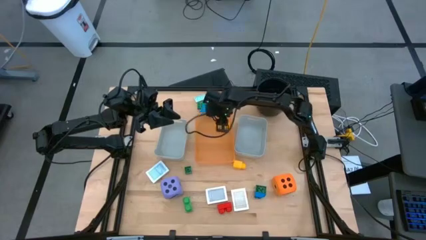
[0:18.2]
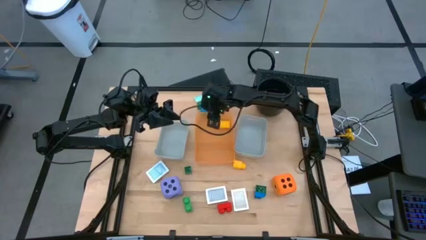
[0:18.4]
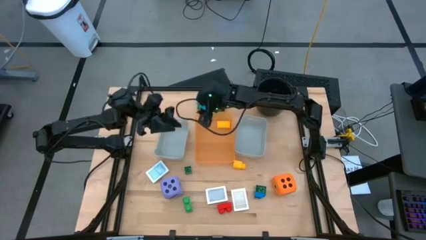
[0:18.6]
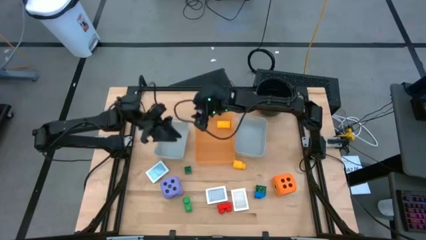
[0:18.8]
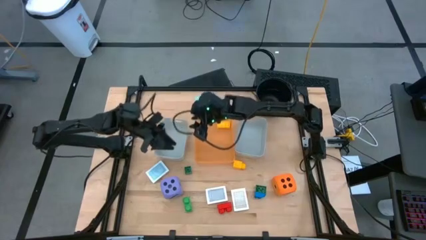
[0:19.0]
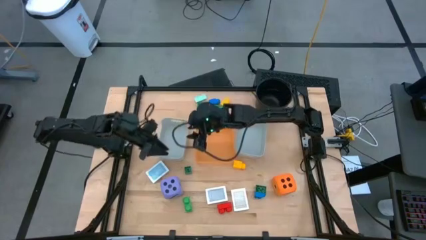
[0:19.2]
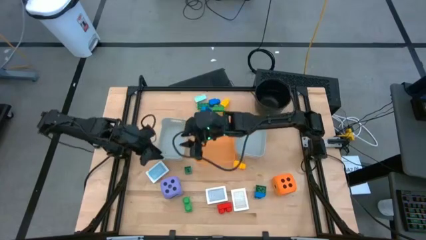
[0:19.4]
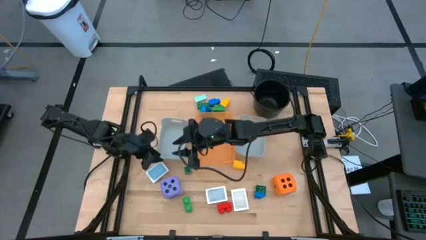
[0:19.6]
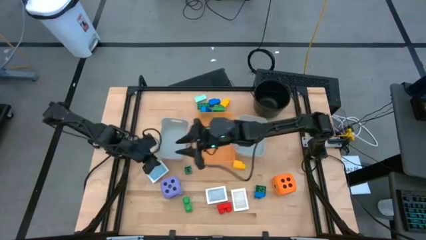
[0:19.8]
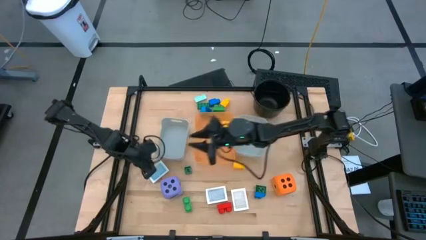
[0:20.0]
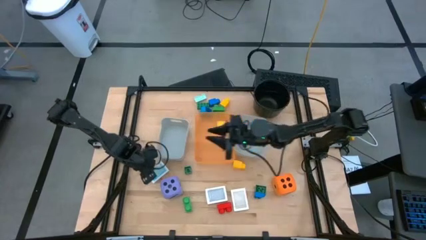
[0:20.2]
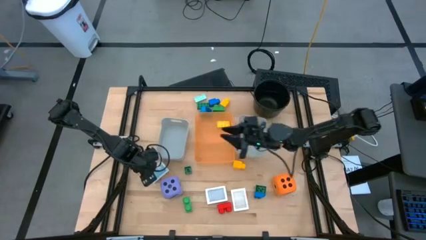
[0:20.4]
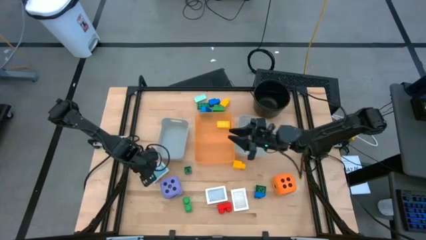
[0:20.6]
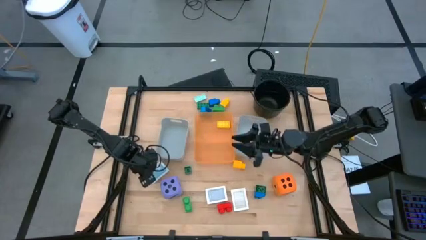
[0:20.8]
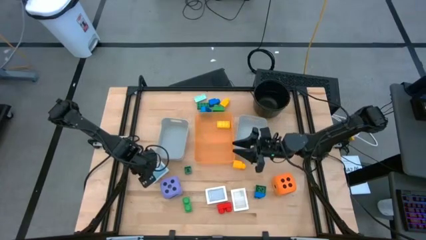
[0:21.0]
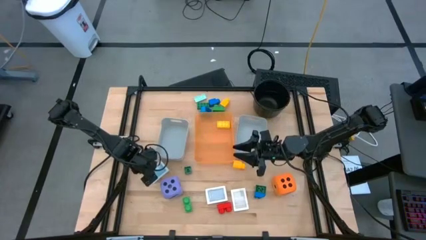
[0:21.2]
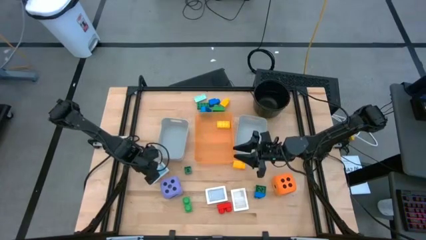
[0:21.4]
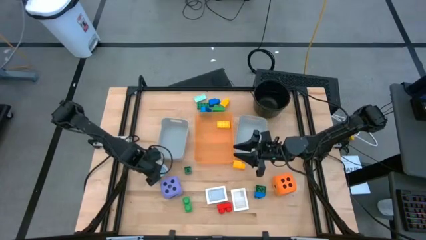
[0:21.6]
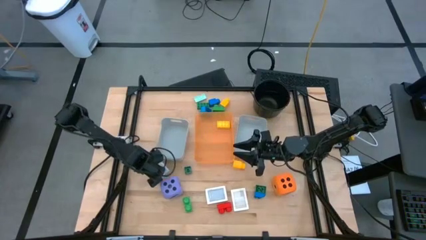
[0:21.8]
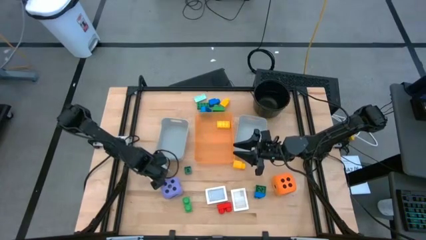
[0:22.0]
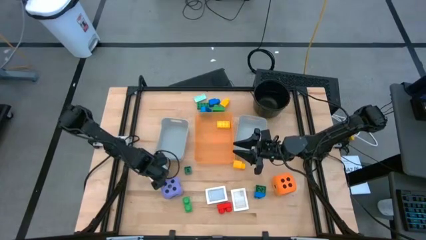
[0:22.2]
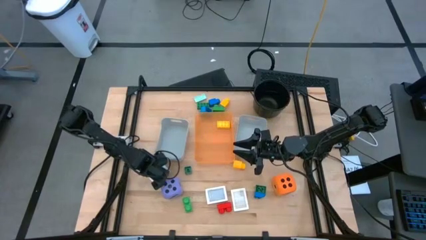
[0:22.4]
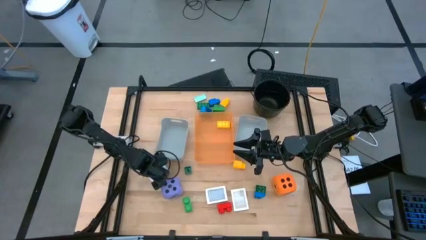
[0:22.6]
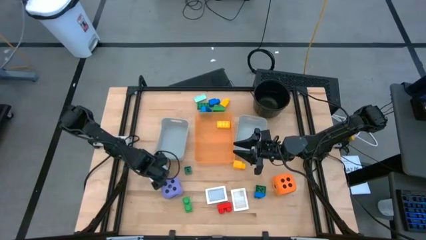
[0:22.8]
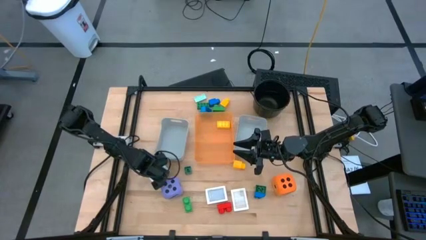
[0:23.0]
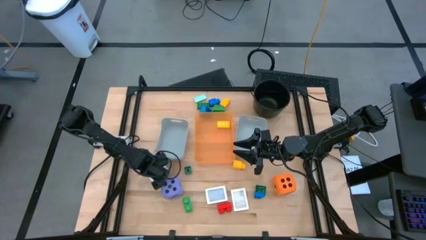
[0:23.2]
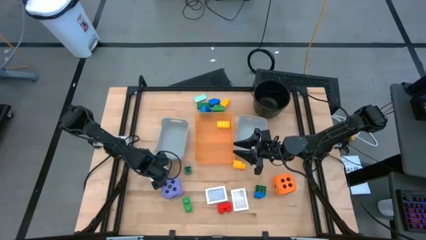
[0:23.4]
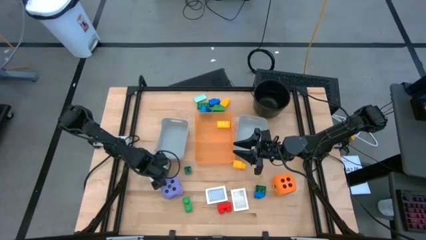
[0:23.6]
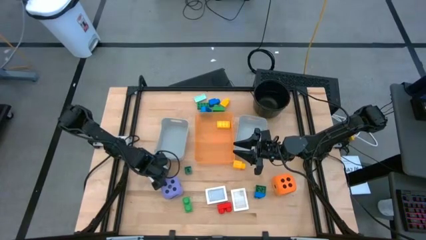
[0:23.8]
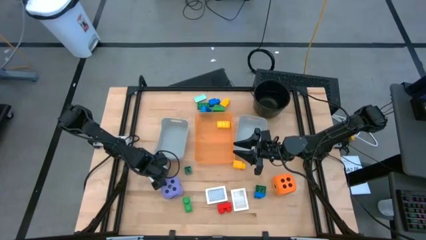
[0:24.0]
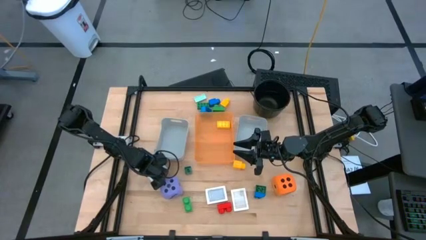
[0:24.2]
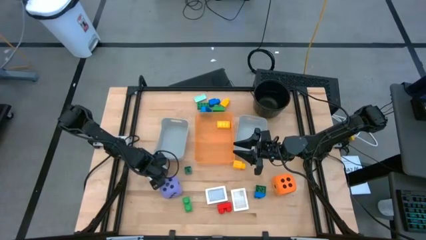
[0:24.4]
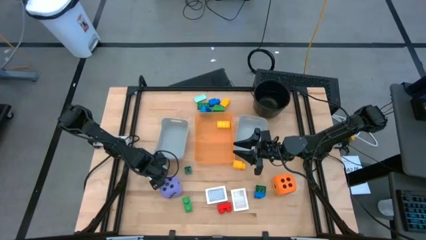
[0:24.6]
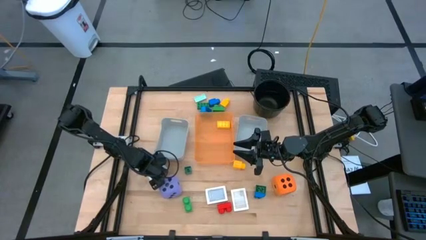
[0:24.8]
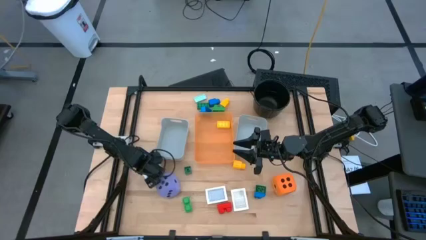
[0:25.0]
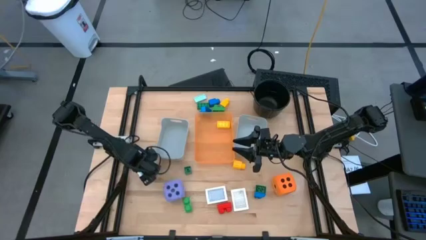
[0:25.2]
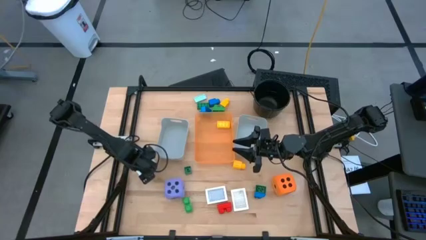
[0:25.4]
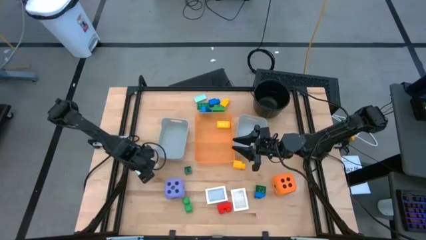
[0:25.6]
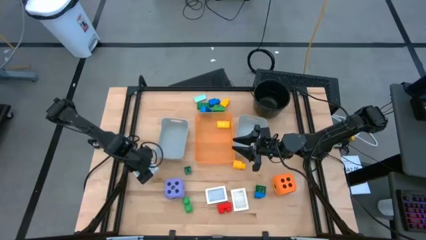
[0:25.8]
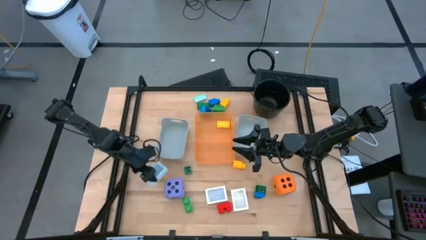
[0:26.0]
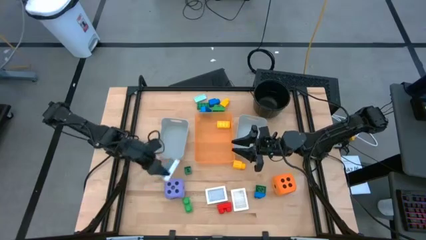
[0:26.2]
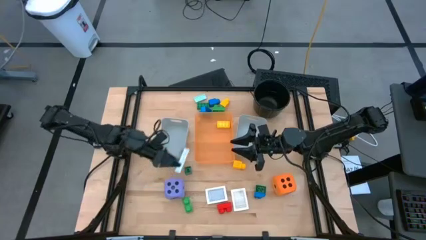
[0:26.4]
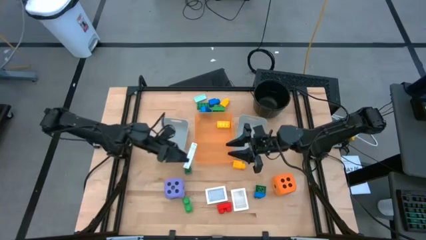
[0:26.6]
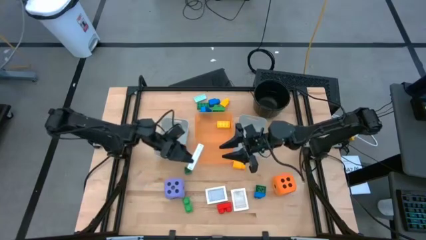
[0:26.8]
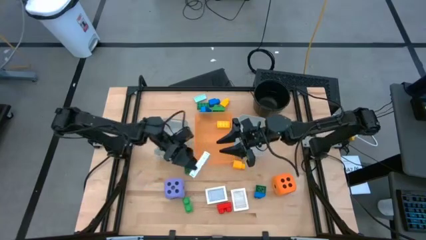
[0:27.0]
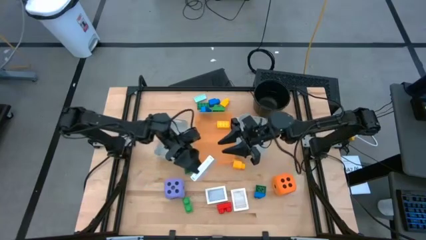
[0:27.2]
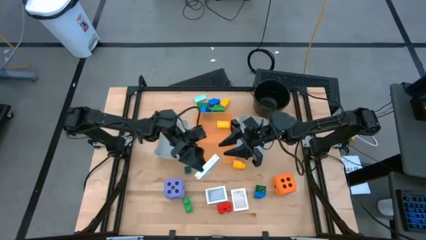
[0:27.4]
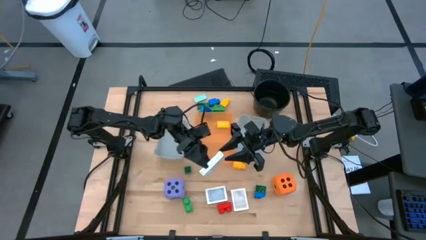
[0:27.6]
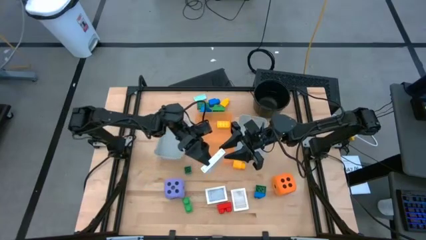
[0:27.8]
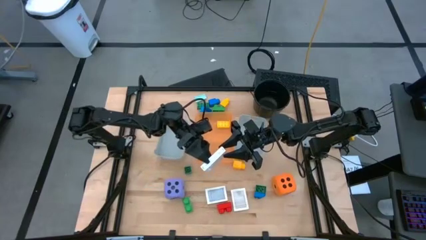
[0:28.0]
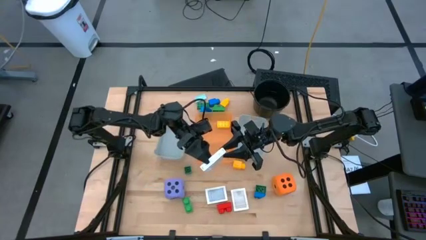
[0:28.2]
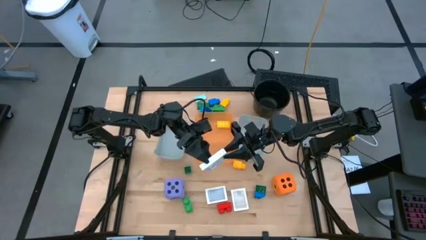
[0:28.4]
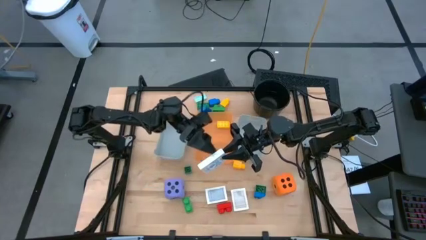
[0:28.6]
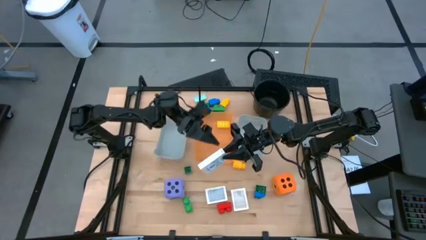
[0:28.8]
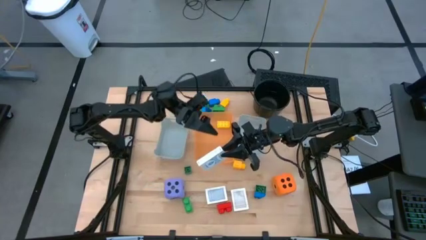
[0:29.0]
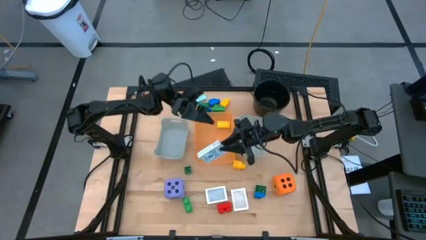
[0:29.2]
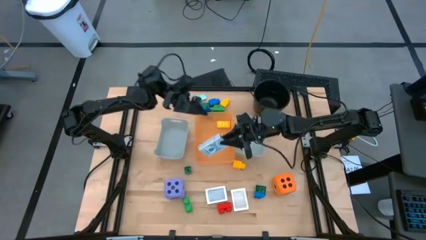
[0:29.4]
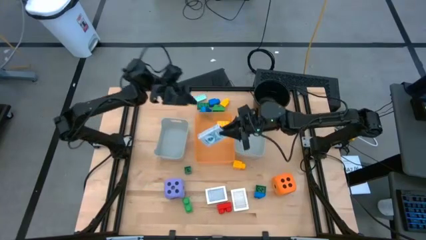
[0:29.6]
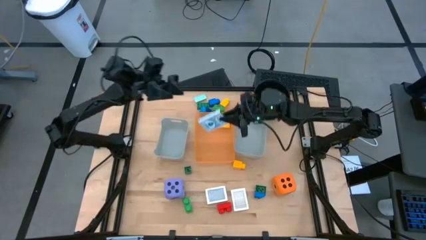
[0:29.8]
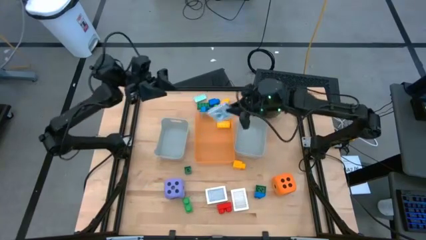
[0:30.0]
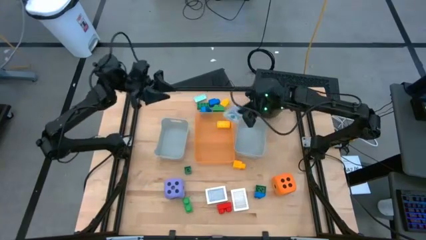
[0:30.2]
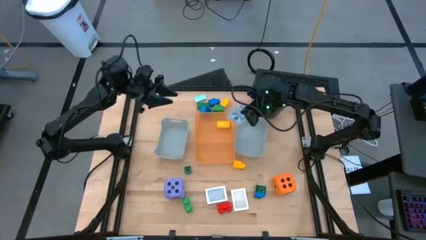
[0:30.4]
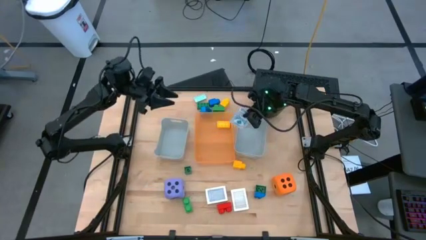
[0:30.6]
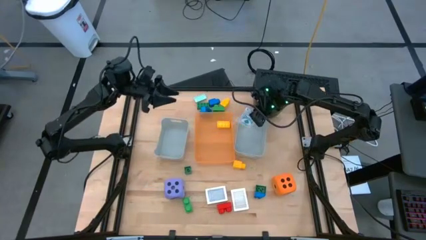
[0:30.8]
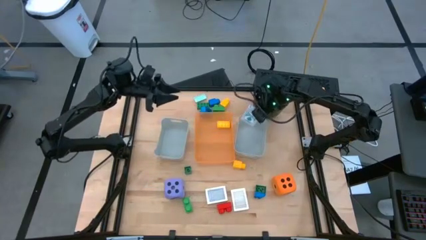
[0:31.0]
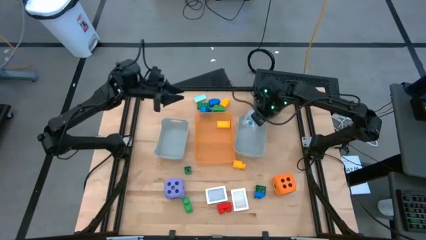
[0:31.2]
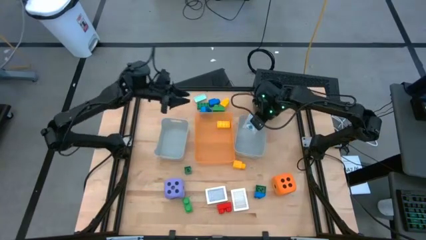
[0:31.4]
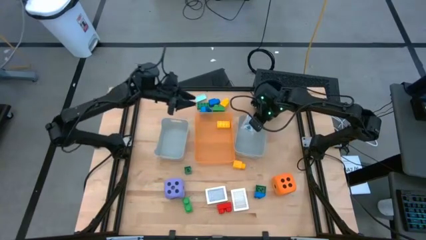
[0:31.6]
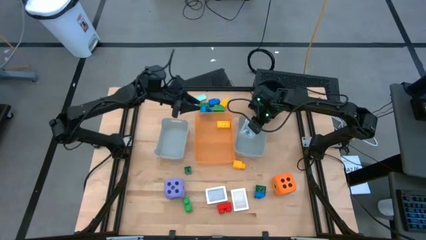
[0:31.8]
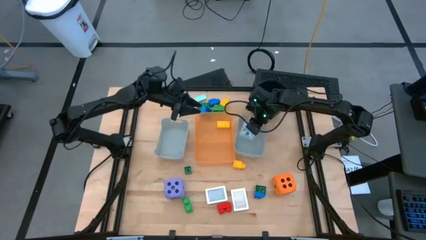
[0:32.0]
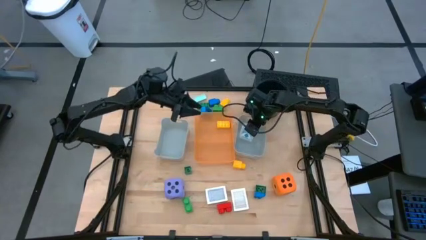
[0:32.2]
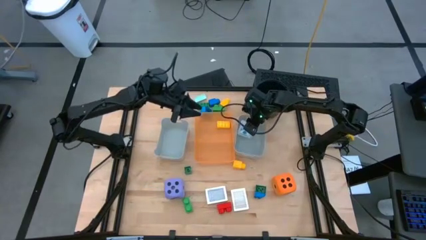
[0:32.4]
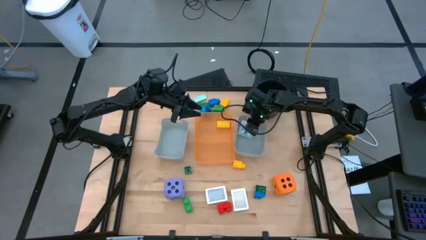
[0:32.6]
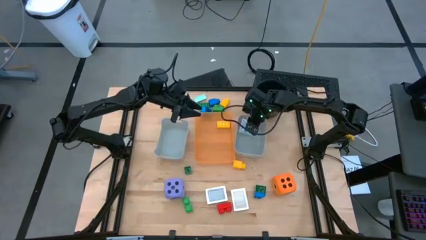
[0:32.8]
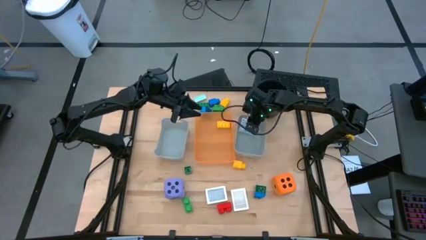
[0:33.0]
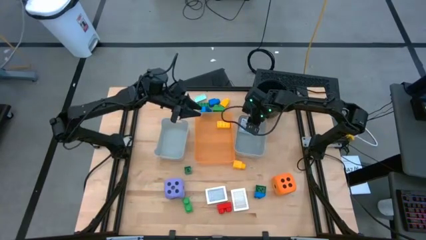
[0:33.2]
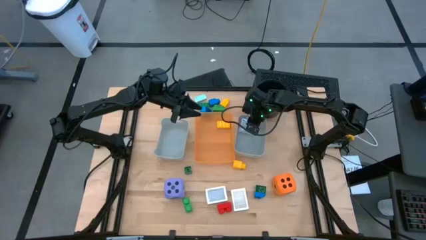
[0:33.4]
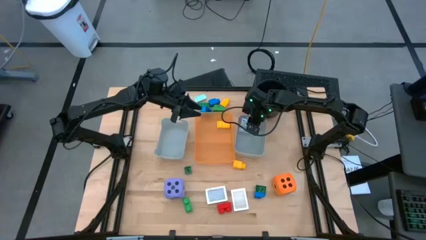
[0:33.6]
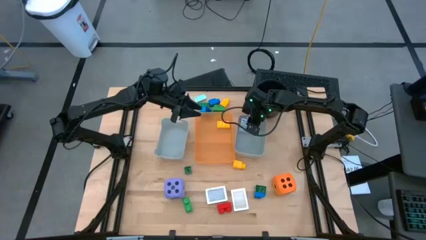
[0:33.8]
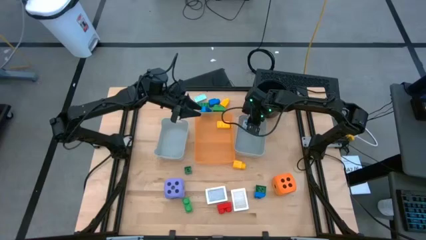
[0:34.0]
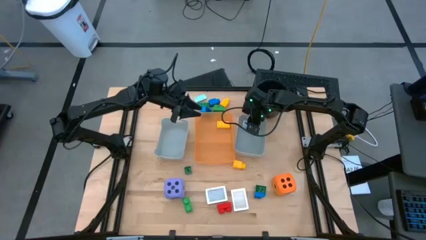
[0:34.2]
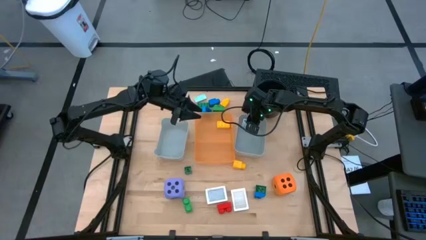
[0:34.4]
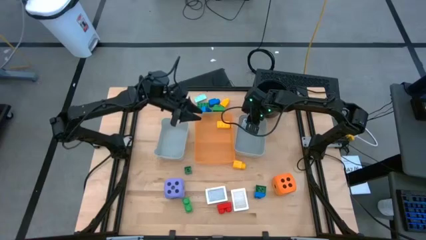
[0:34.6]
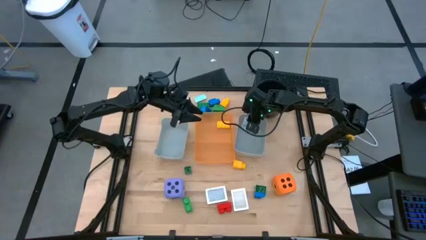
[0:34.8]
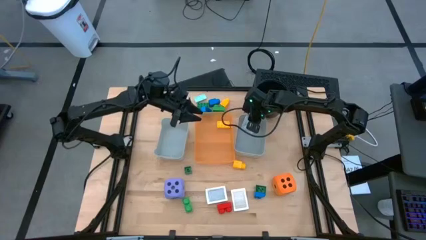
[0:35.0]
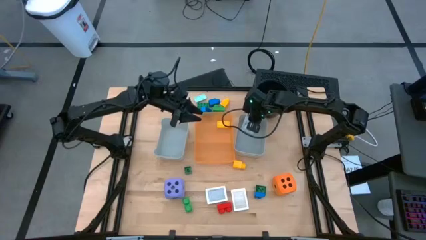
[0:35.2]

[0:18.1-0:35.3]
Task: Pick & Place Toys
Put the light blue deck of cards into the right gray bin

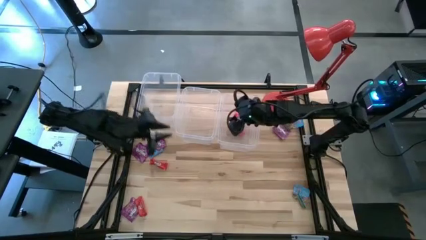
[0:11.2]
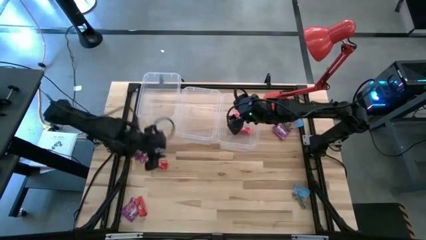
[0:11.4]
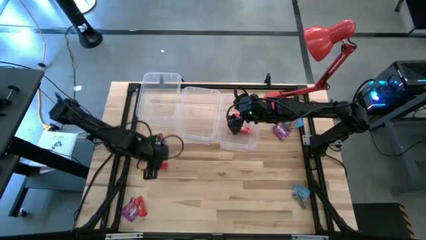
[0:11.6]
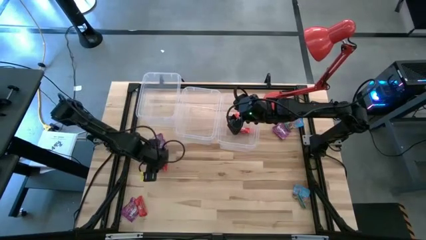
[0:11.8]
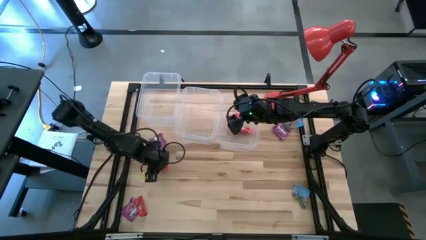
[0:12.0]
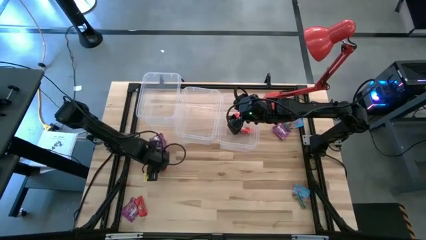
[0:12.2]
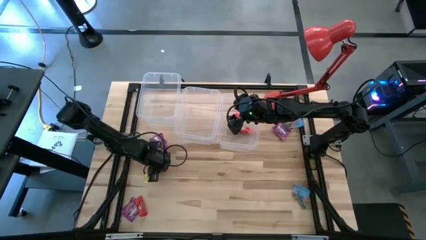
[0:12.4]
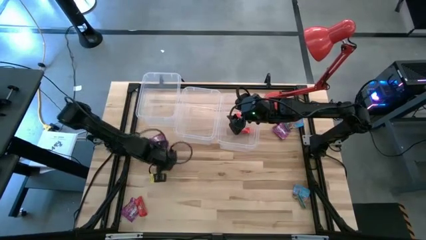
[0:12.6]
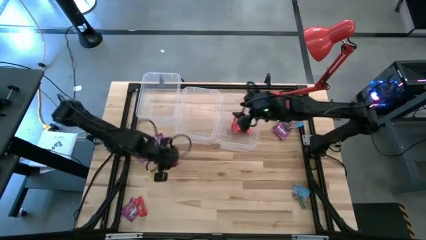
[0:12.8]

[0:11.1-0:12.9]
Task: Sort candy
Put the top red candy into the top right transparent bin
